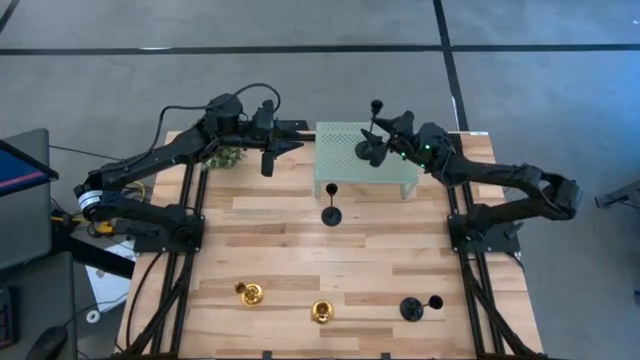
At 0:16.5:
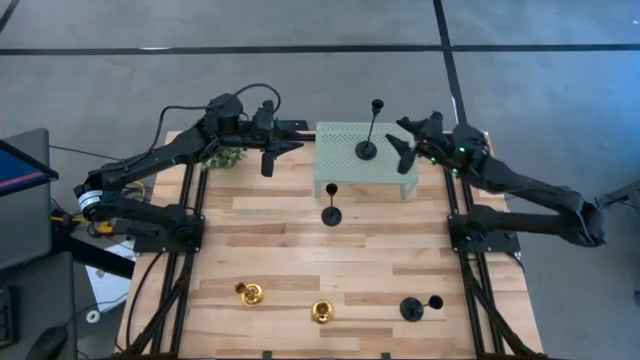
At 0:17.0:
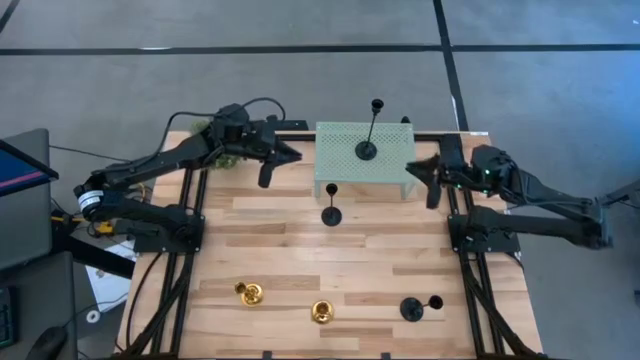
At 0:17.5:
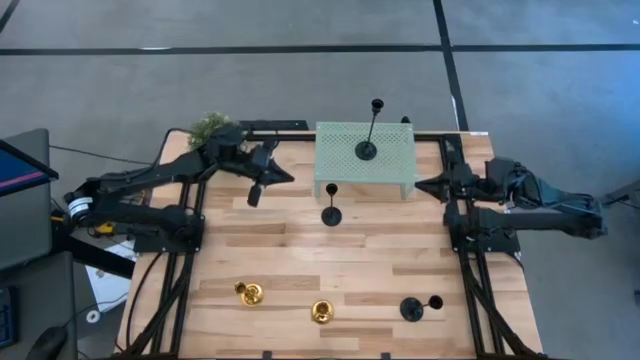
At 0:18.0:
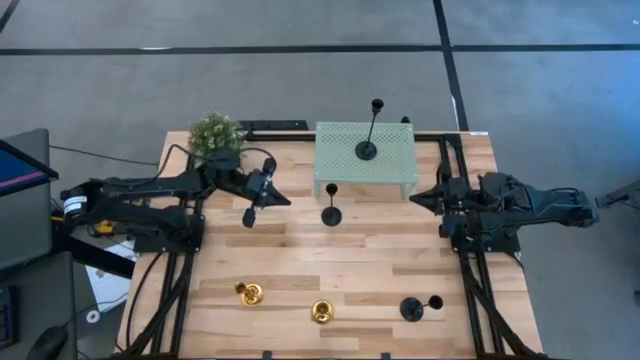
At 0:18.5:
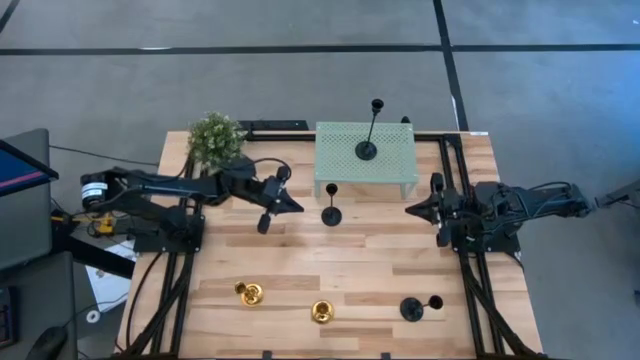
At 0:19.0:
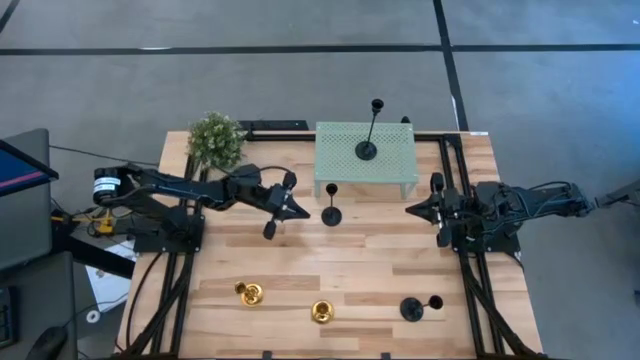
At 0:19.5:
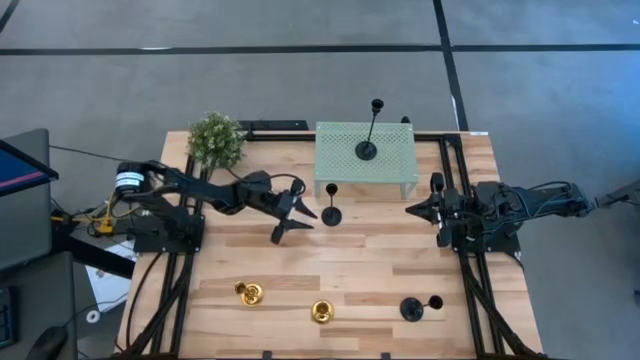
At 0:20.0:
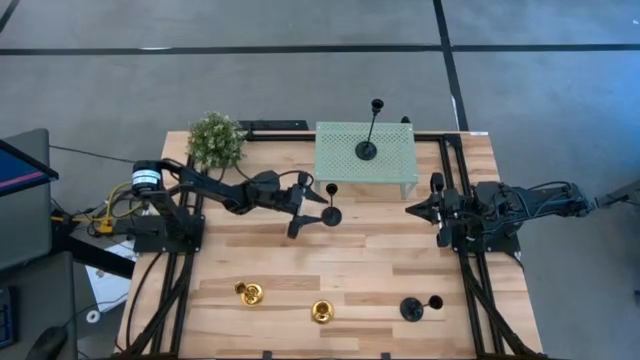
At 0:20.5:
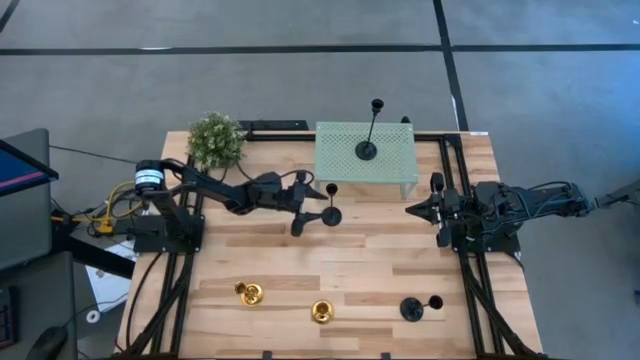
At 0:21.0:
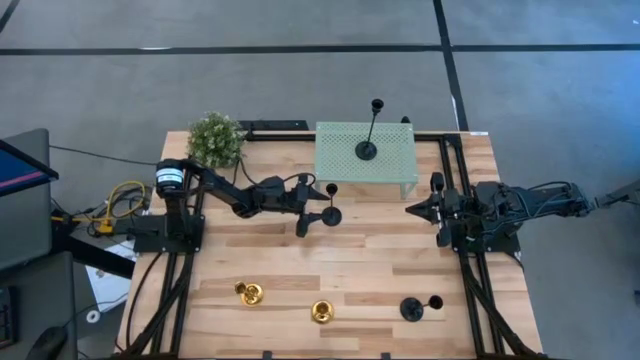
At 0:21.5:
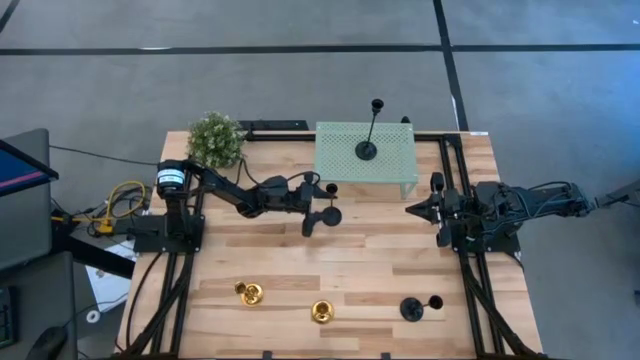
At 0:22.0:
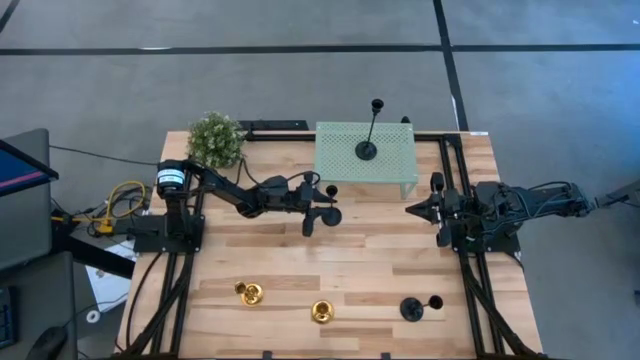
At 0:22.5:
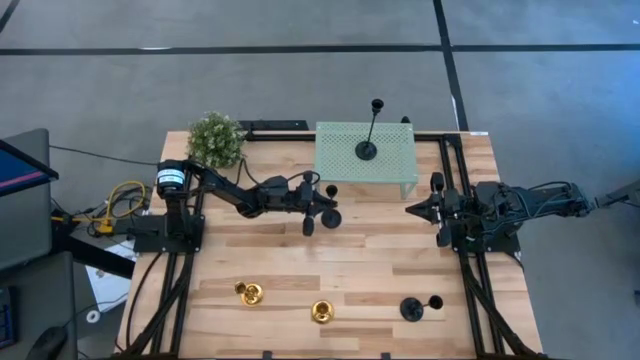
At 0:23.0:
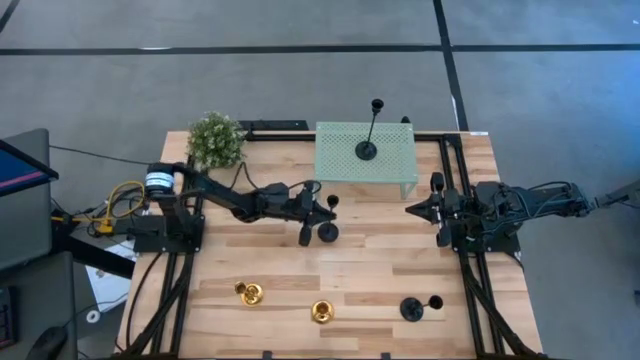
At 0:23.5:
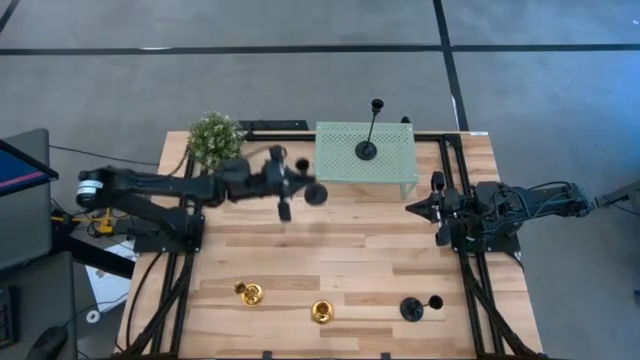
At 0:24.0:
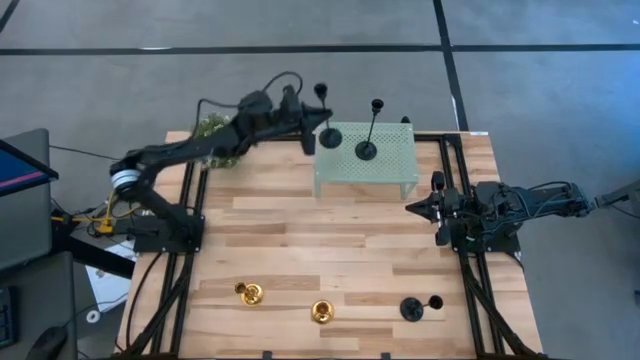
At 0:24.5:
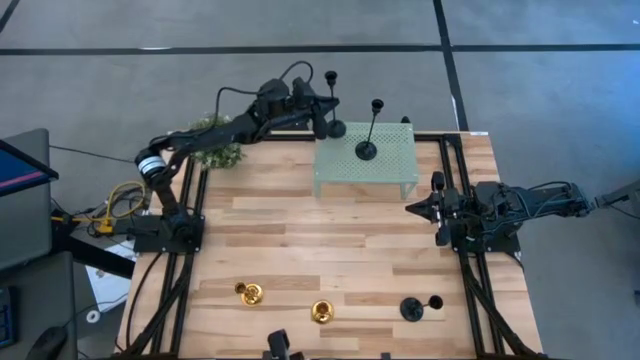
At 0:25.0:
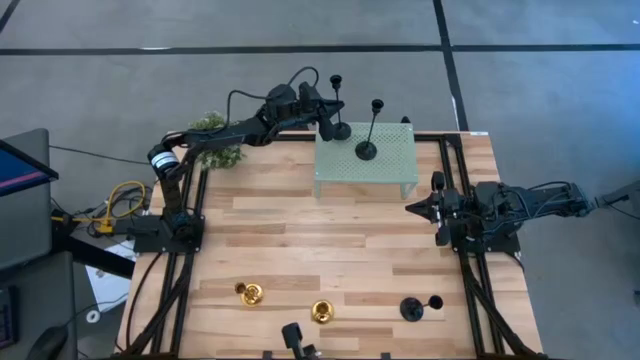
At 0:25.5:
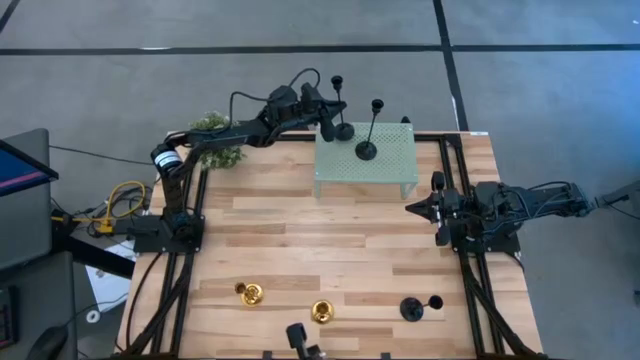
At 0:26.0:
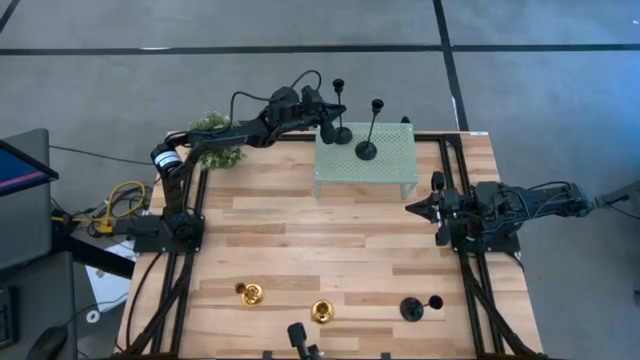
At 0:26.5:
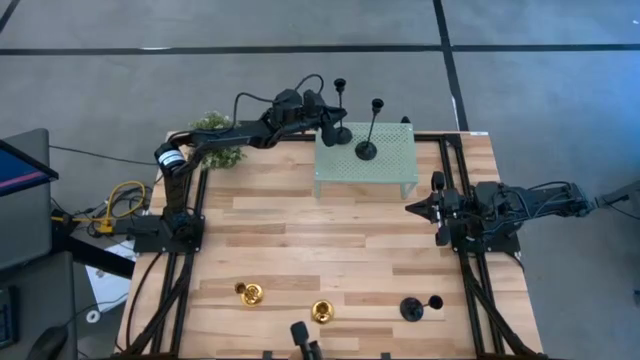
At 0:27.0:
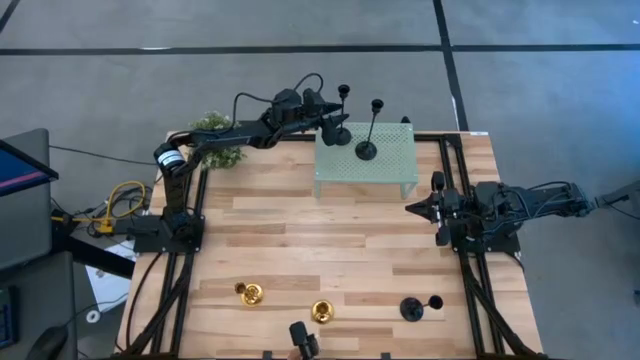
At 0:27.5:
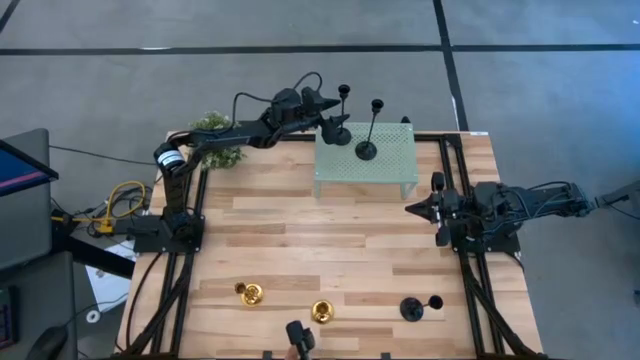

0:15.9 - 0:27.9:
Task: Pick & Place candle stick holders
Put the top black candle holder on the shelf

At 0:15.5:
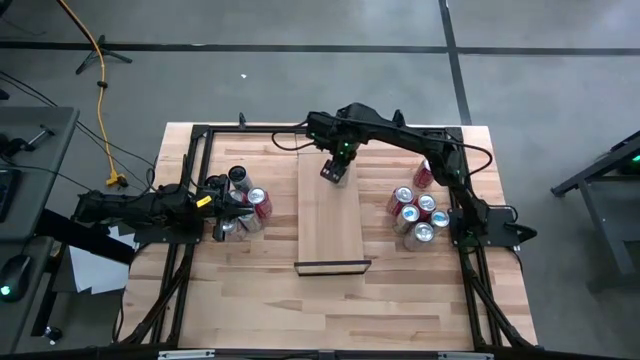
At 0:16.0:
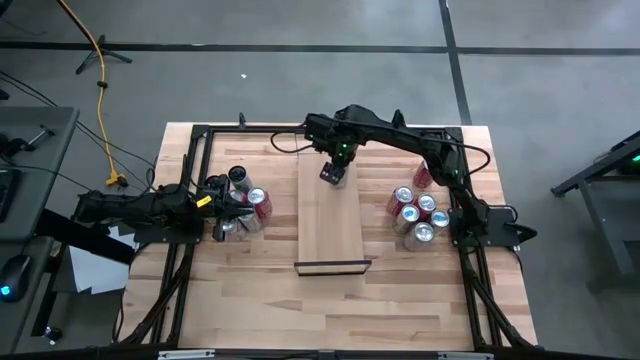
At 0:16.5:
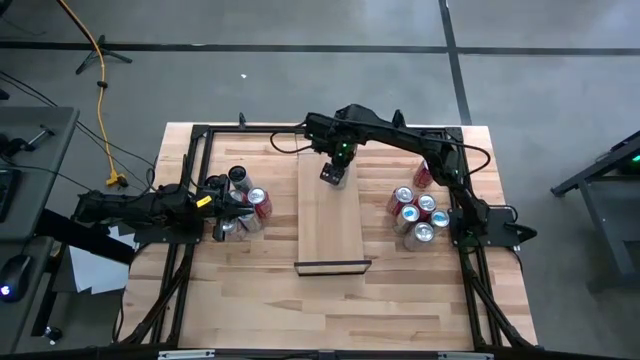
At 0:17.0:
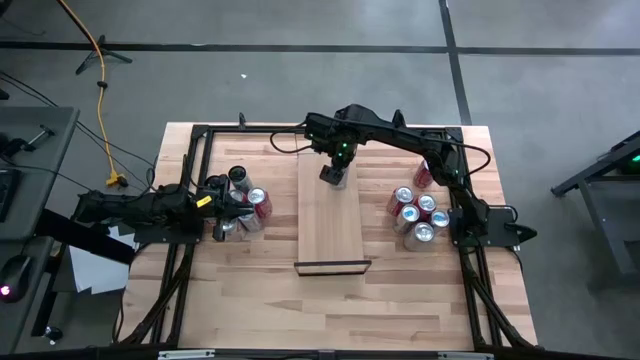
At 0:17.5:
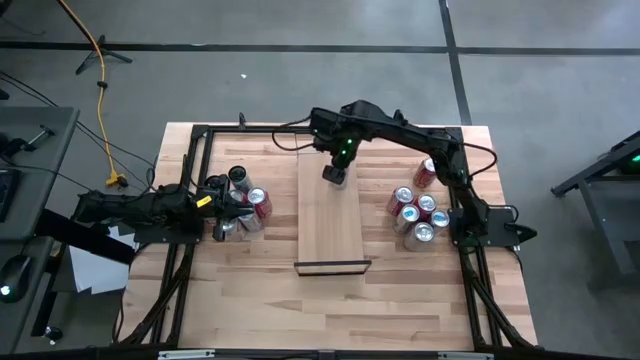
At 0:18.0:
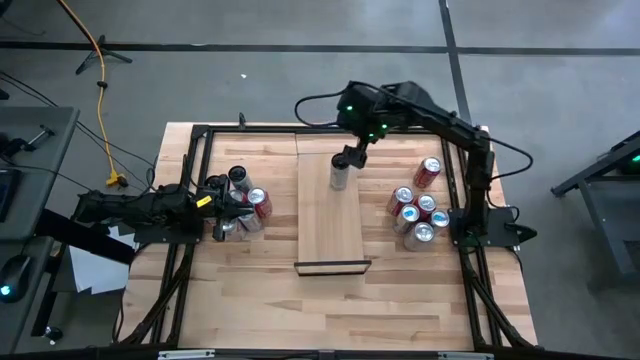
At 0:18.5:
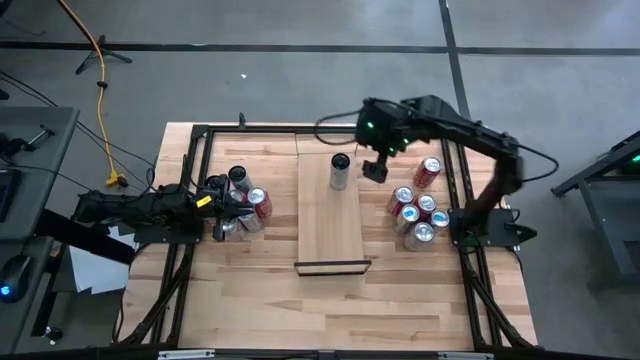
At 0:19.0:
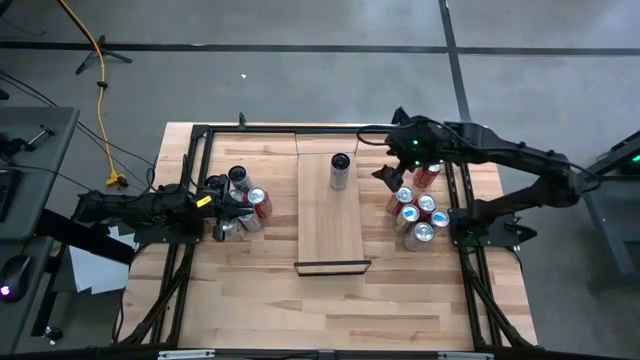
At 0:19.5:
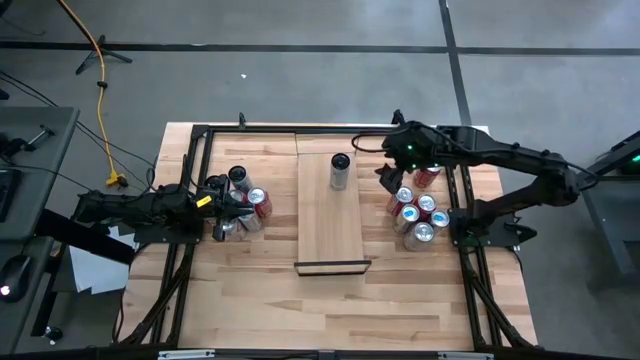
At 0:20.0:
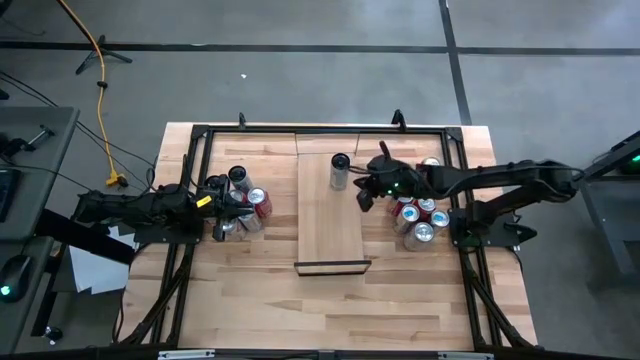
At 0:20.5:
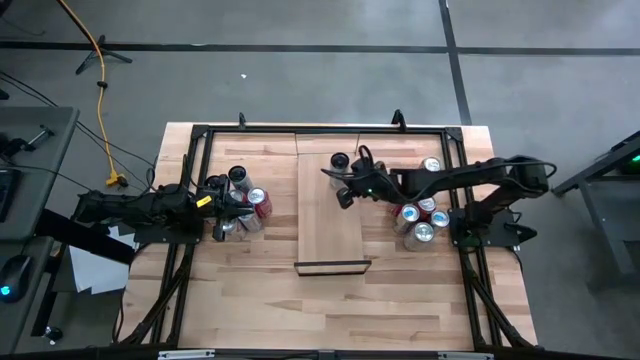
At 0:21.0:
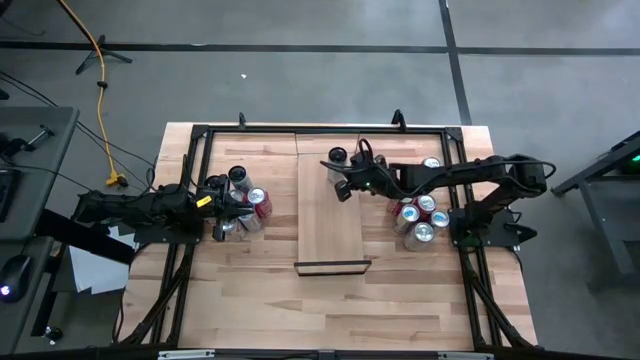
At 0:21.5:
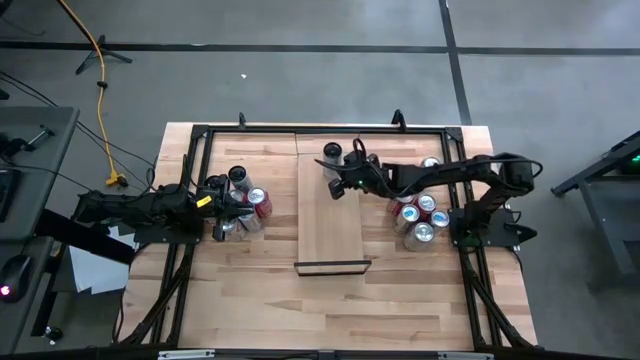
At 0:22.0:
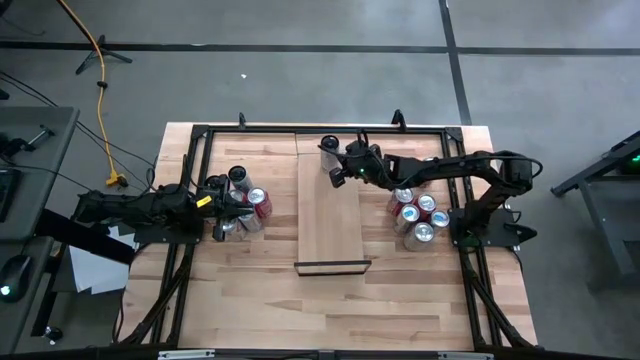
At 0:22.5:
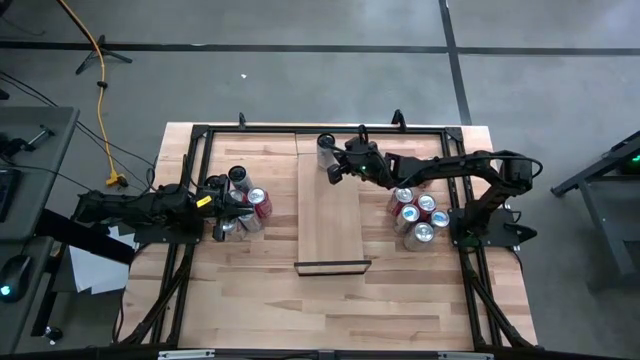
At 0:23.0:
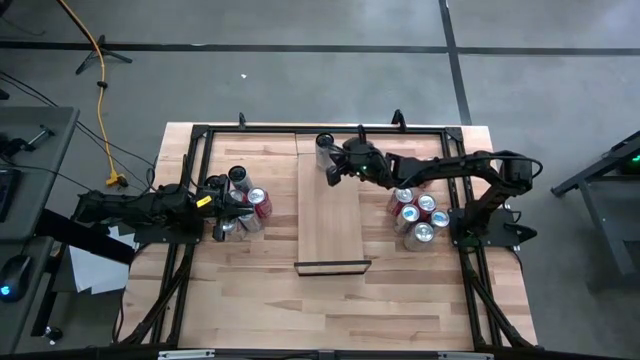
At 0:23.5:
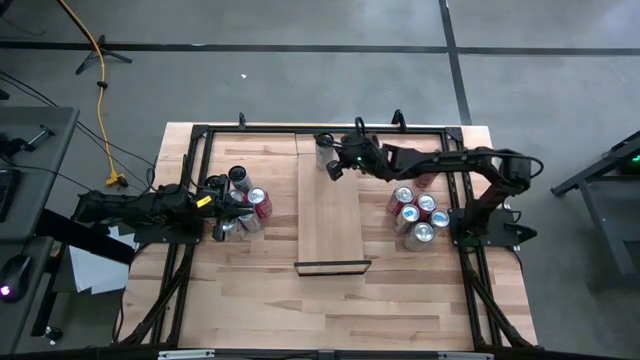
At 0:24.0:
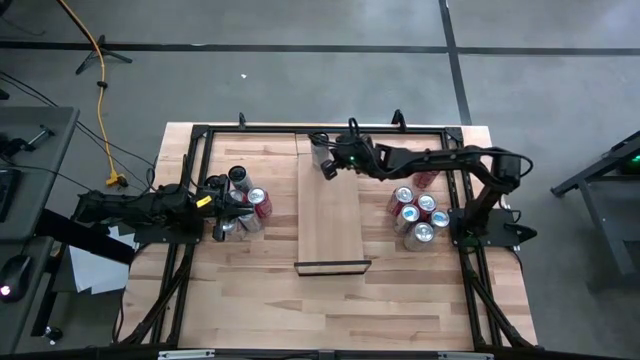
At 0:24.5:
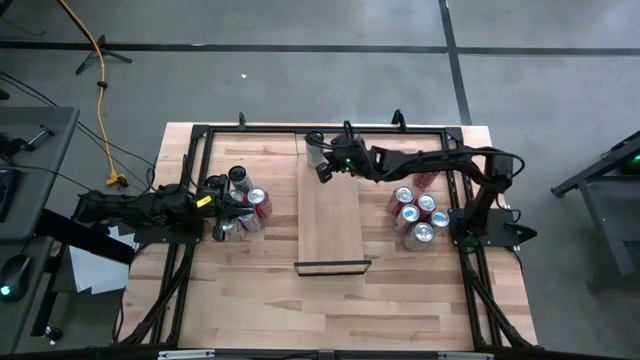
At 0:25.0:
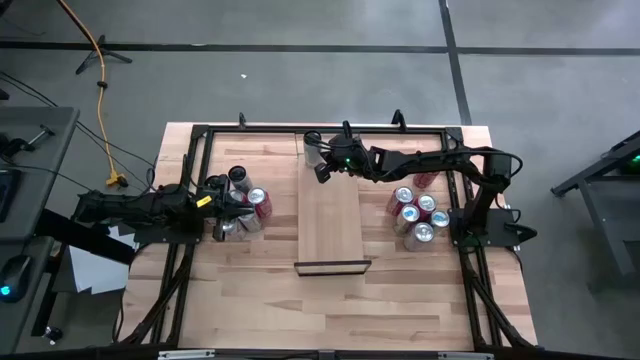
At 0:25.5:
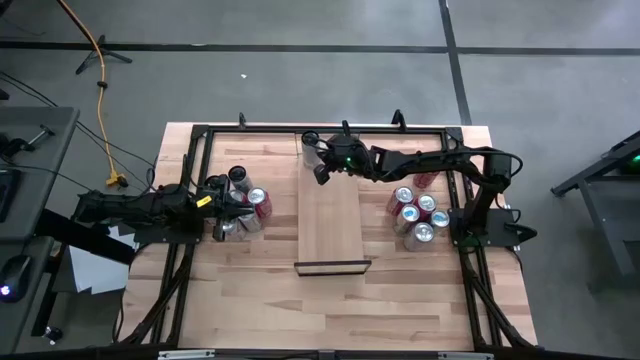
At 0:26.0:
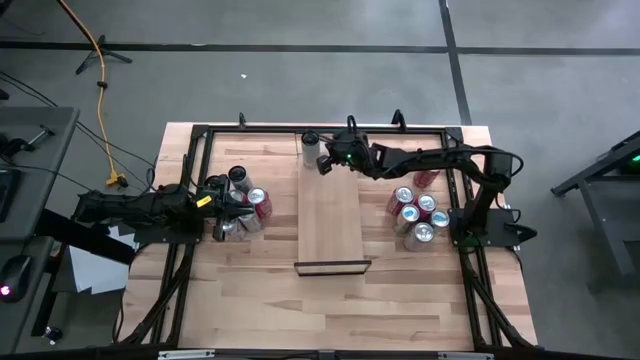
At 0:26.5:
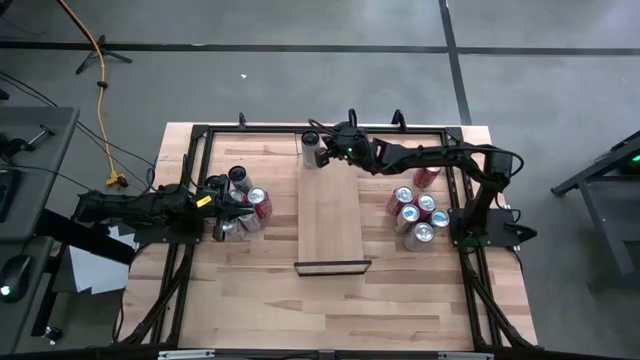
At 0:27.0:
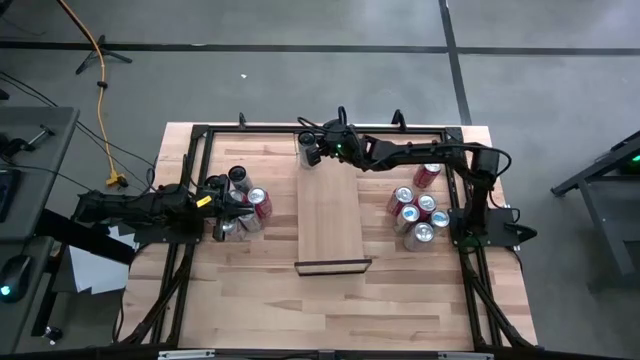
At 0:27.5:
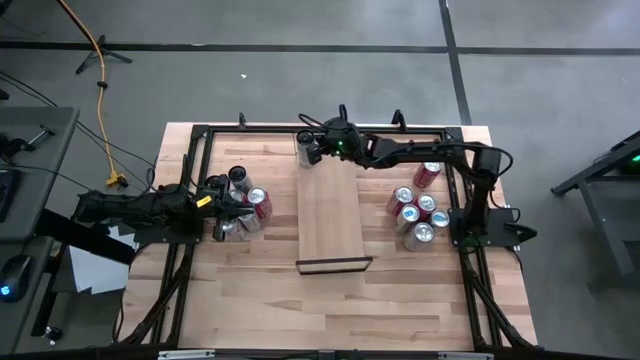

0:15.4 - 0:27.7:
Task: Place canned beverage on shelf
Put the top right white/pink soda can on the shelf
